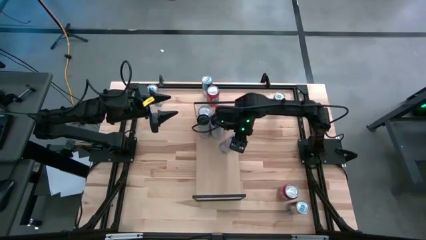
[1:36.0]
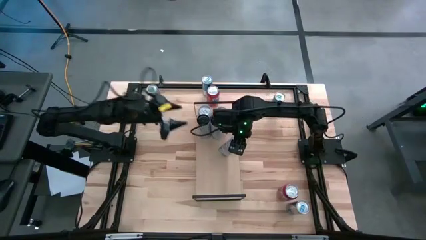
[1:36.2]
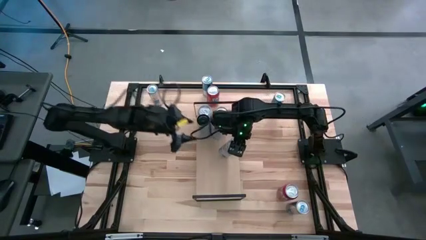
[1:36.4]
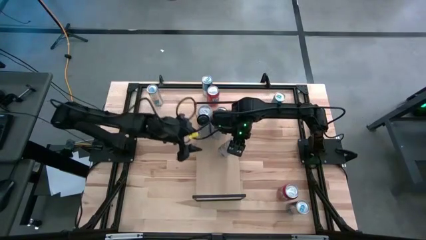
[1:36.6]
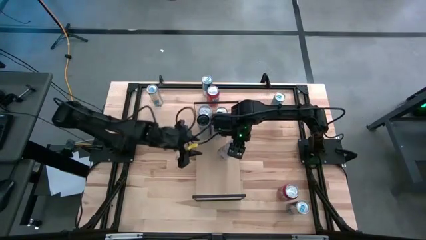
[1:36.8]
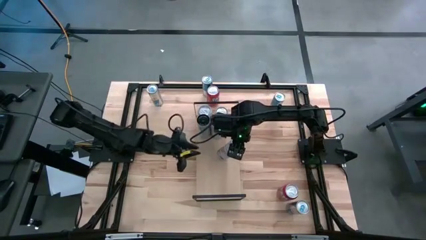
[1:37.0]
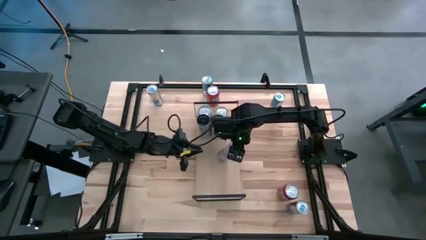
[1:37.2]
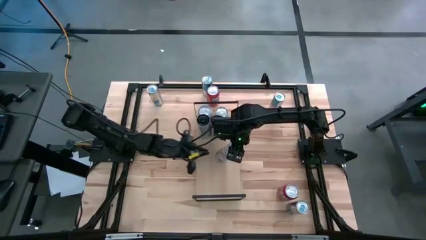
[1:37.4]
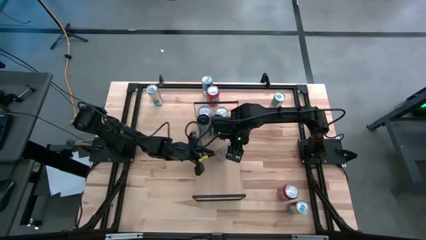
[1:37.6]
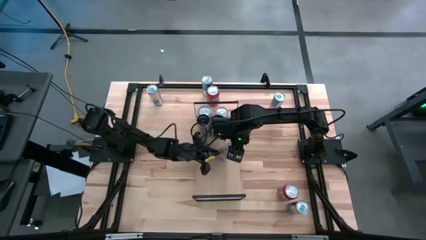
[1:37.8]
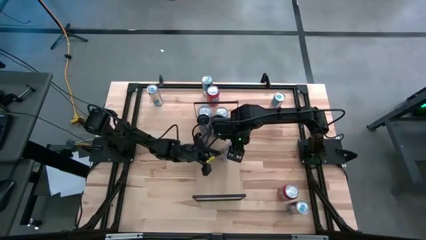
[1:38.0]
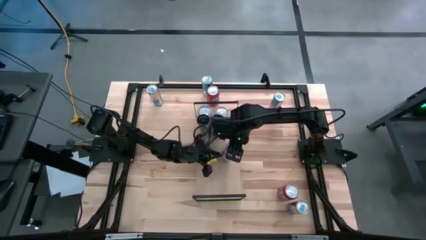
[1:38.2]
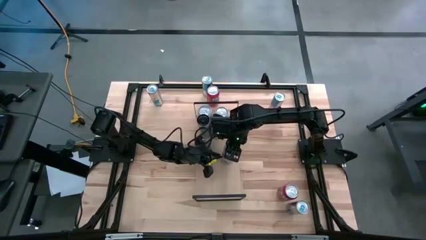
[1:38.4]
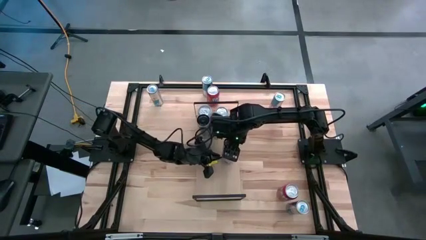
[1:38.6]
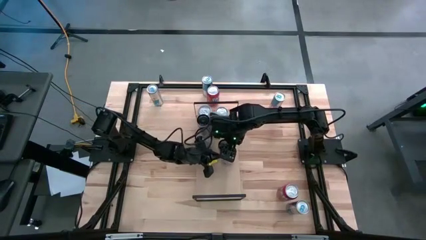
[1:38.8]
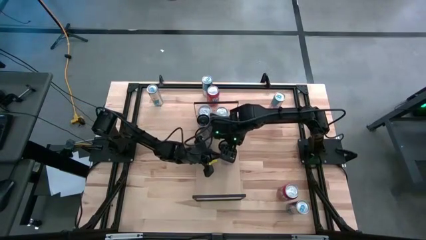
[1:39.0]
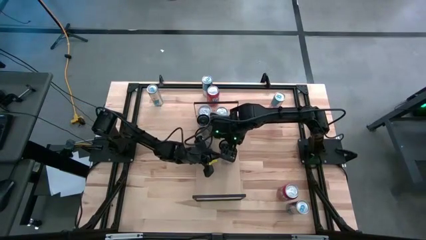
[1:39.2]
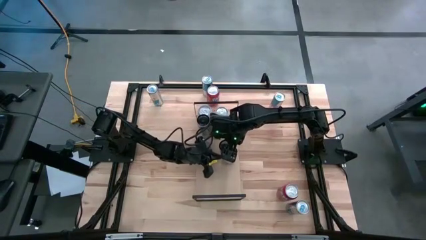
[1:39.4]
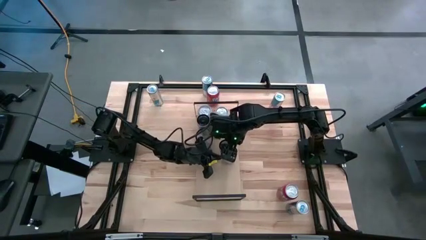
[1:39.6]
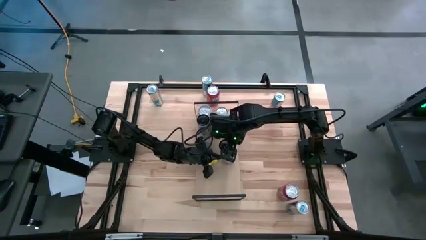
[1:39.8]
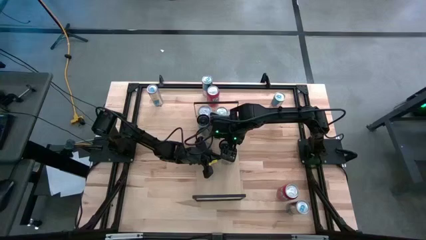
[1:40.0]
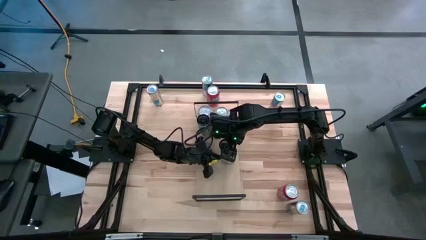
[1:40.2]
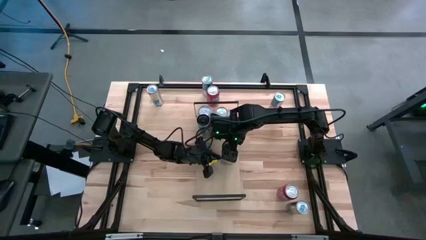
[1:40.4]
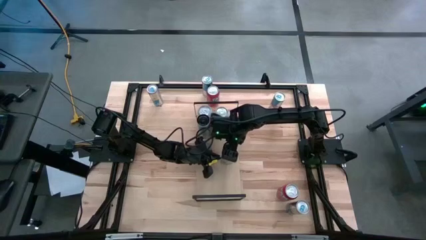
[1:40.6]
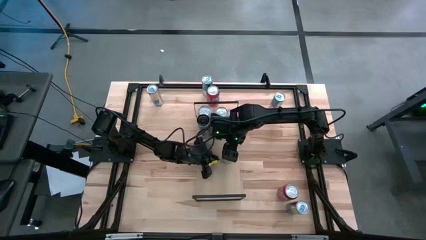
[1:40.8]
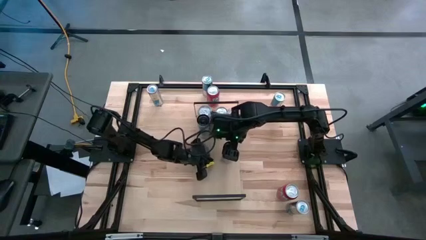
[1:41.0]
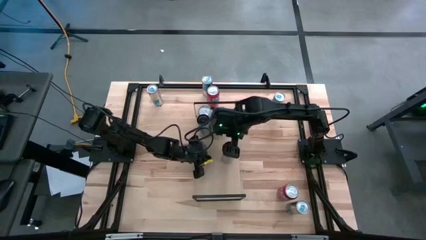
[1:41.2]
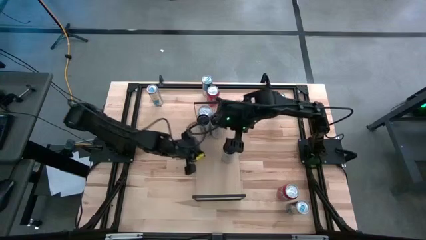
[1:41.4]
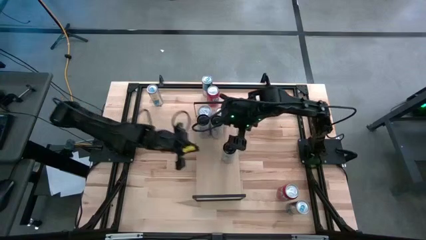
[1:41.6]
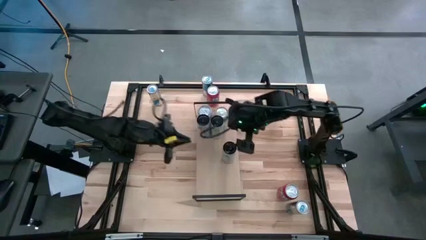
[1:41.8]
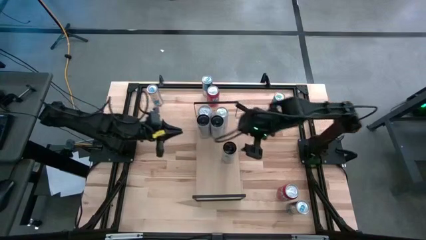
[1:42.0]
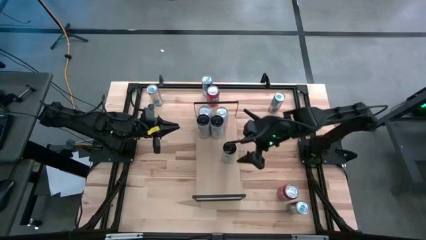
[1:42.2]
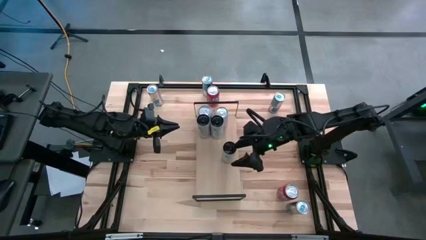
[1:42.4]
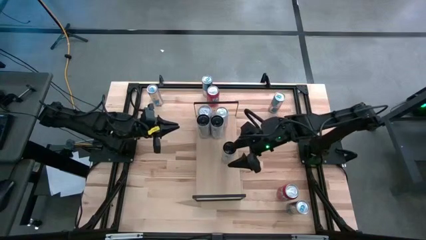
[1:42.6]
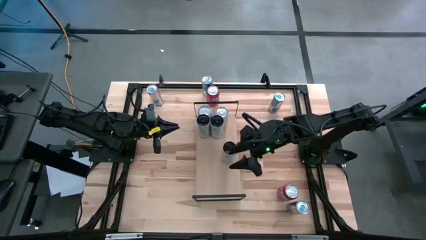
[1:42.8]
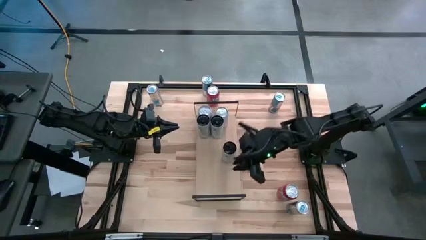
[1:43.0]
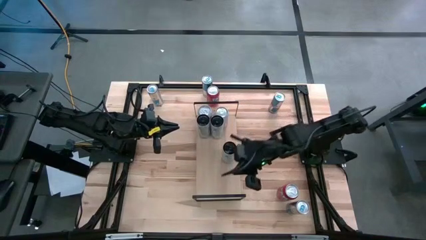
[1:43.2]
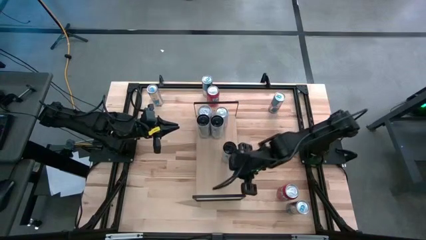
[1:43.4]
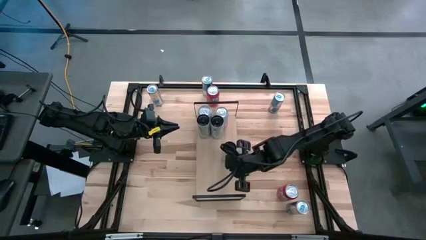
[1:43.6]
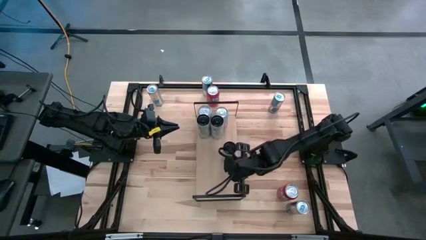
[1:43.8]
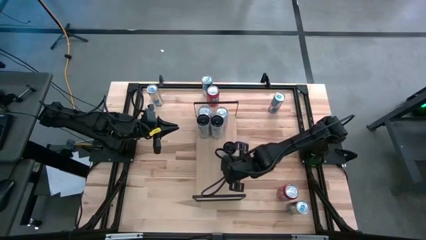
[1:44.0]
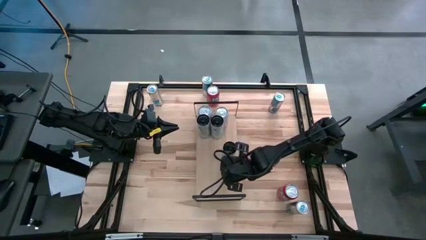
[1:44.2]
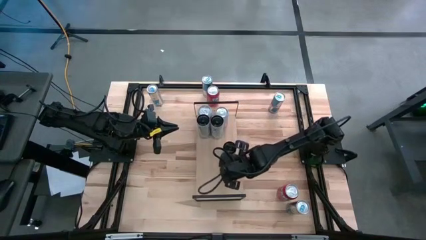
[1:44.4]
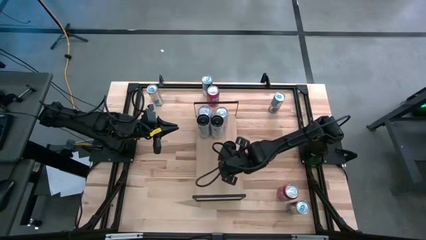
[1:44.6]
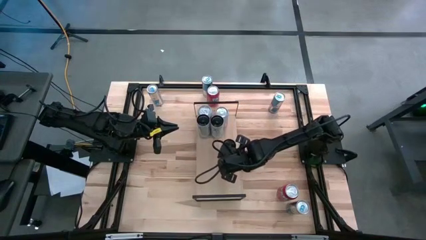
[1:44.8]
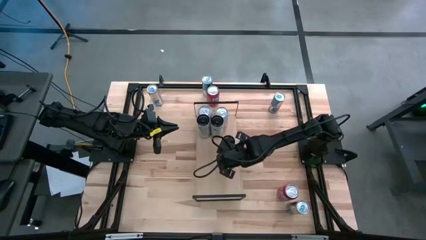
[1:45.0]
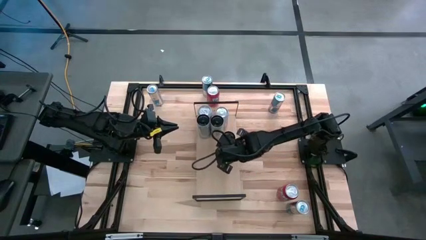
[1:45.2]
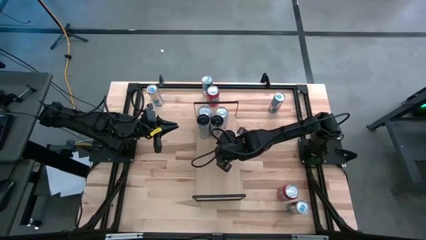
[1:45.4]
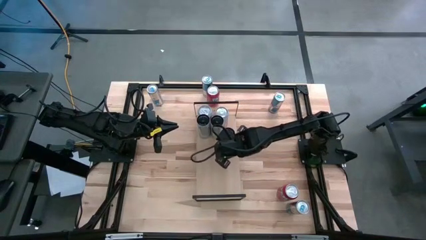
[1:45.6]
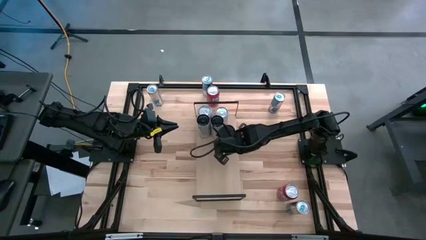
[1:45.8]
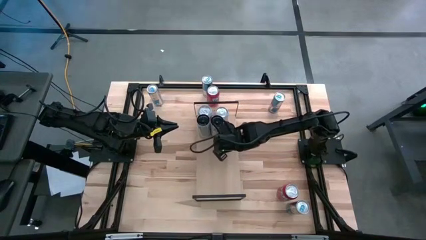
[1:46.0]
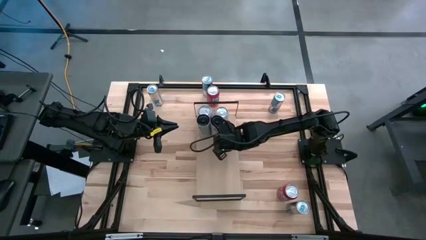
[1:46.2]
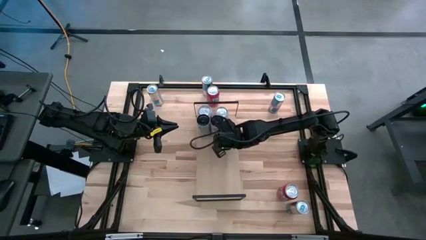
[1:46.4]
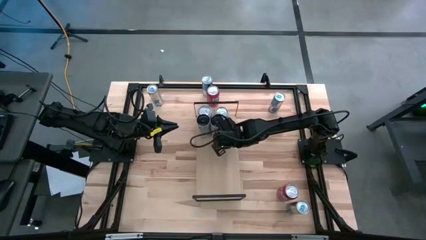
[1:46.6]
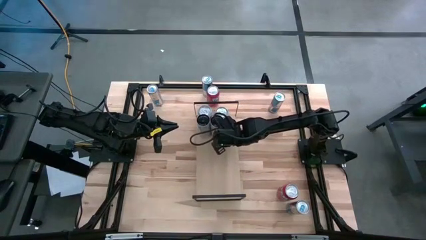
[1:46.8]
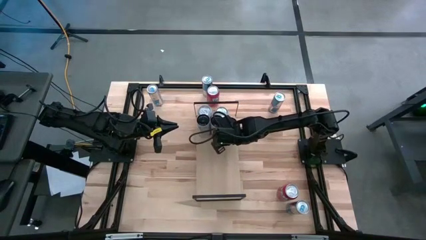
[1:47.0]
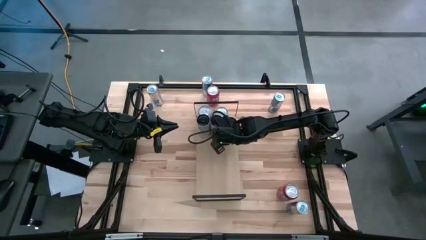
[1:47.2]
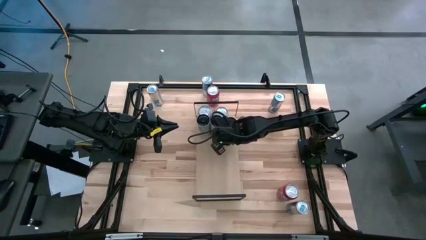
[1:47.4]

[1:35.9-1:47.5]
Task: Place canned beverage on shelf
Put the white pink soda can on the shelf

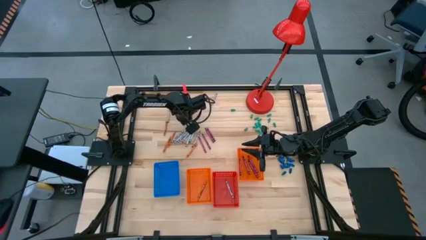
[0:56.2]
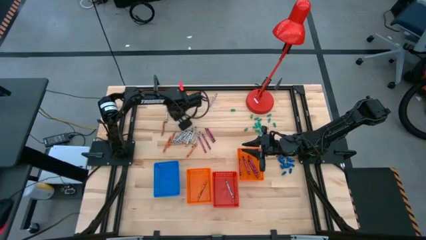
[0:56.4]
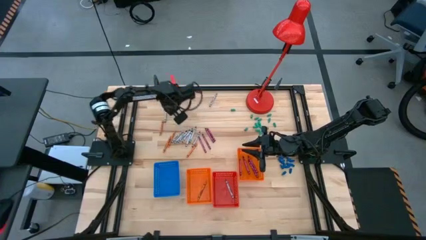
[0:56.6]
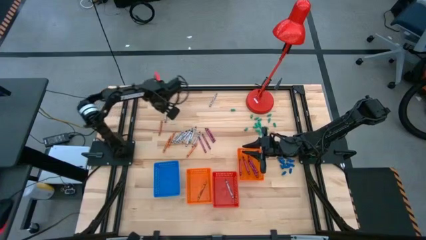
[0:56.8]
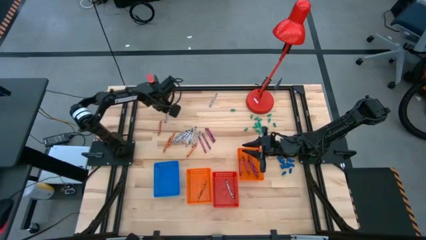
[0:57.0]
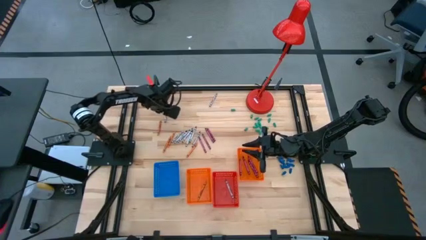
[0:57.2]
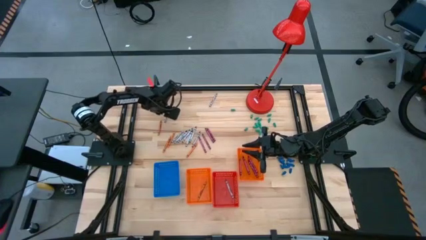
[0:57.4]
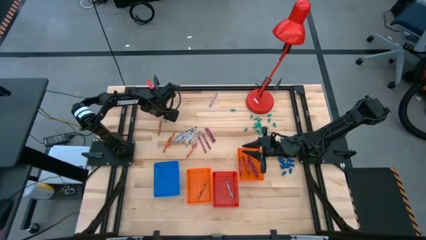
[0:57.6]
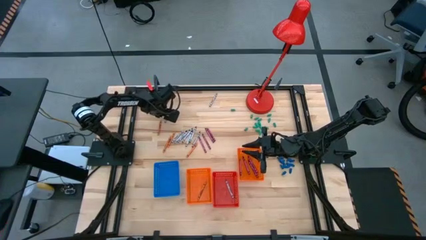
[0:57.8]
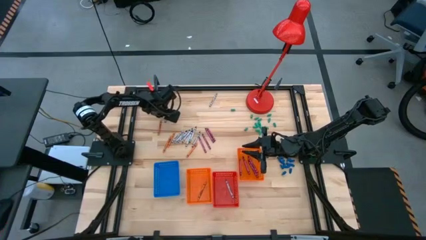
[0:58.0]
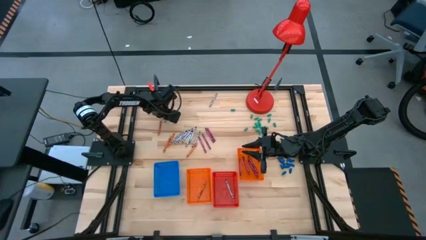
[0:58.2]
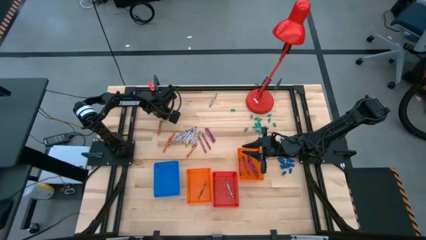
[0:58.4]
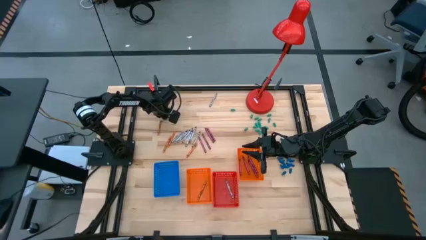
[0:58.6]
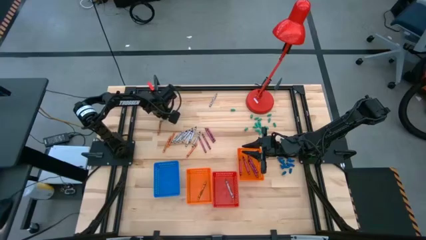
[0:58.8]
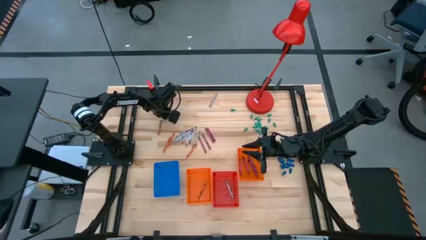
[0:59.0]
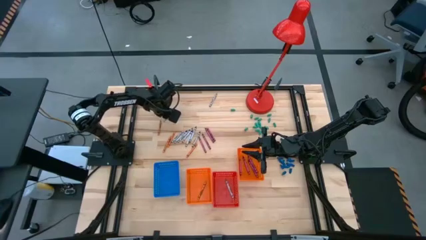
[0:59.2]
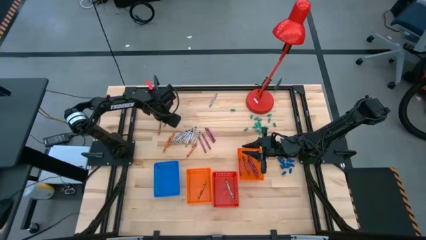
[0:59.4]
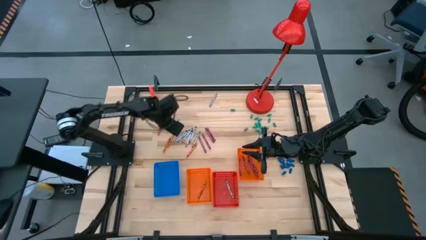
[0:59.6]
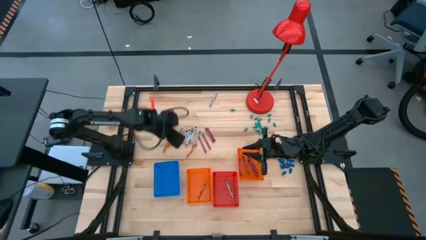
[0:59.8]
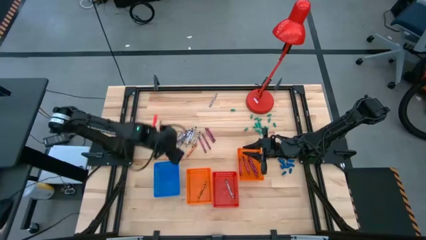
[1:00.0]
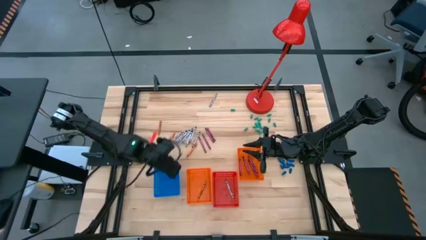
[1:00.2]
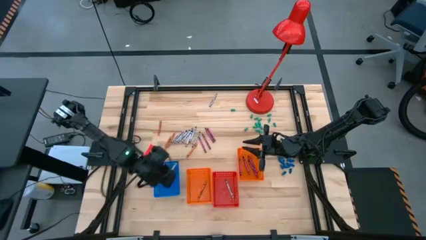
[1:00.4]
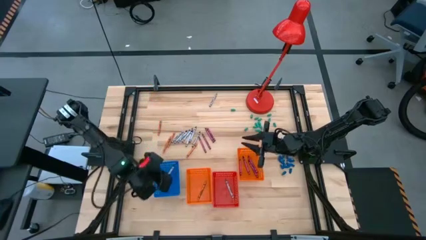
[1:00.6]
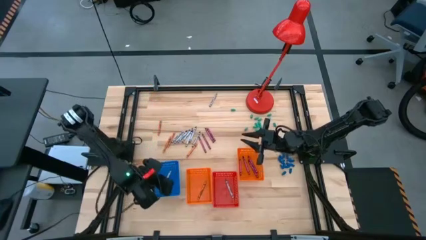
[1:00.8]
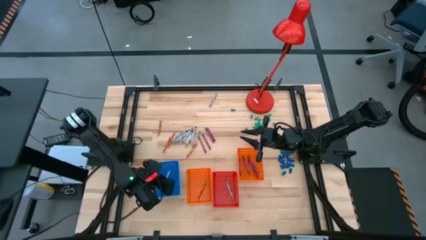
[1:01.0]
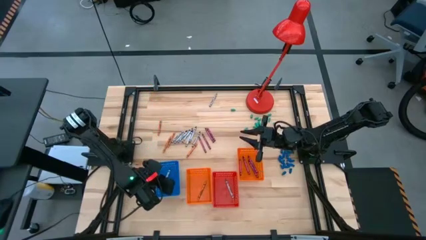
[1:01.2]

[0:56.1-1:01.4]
Task: Sort crayons
Put the black crayon into the blue bin
